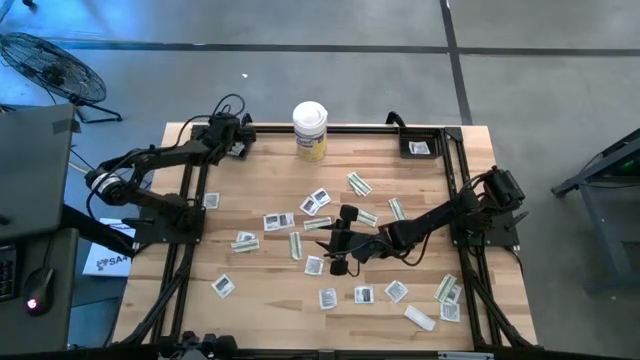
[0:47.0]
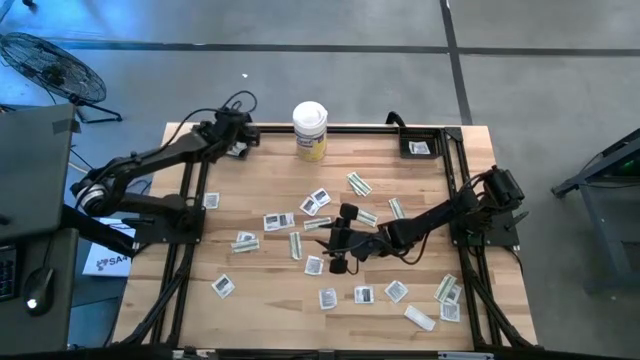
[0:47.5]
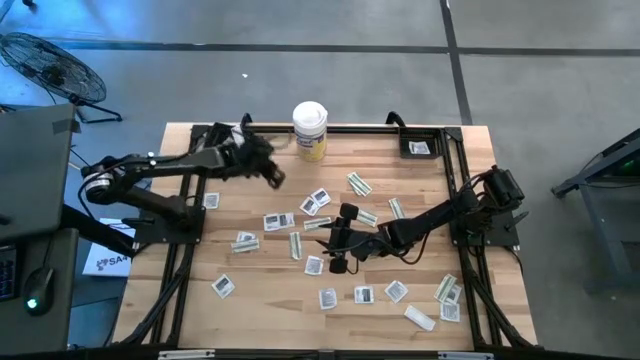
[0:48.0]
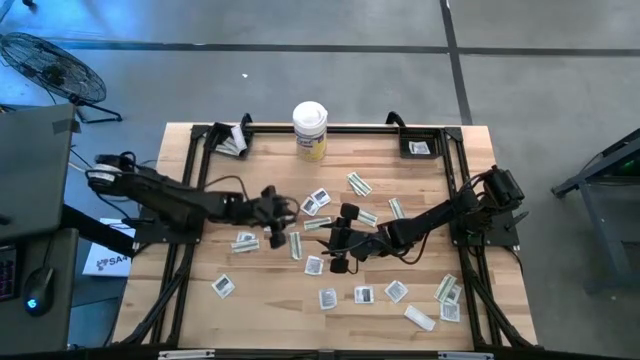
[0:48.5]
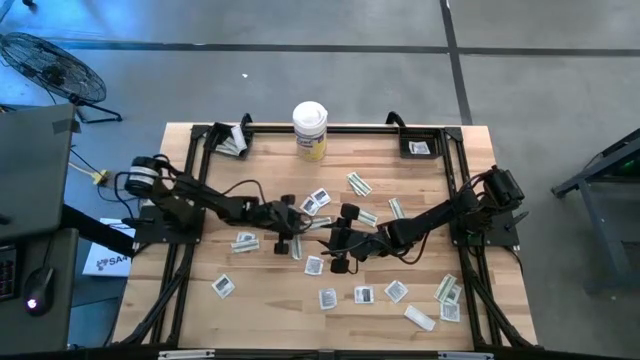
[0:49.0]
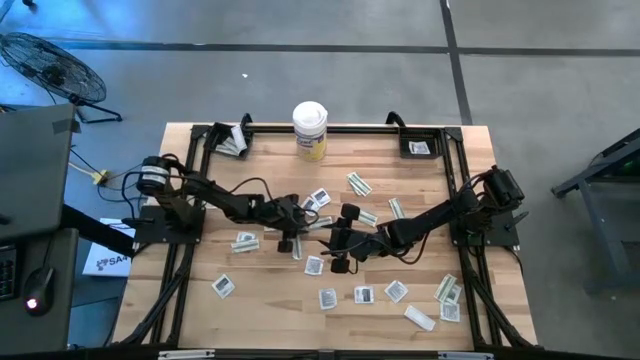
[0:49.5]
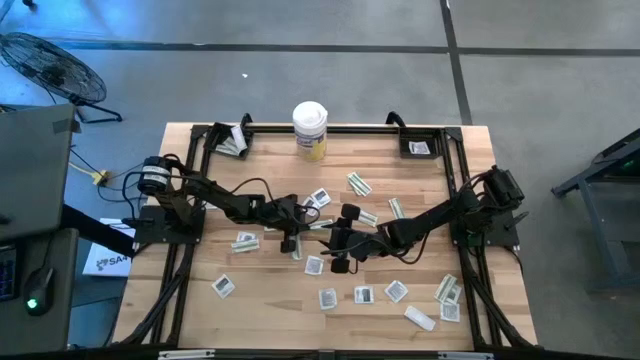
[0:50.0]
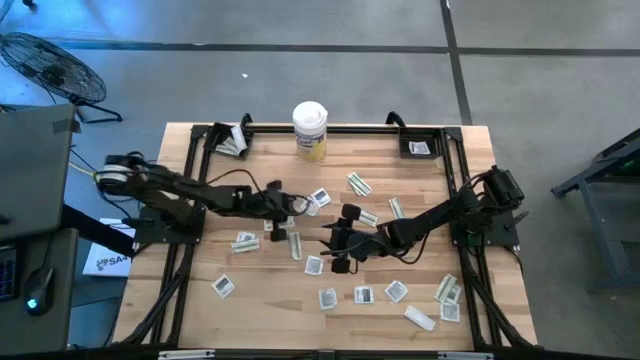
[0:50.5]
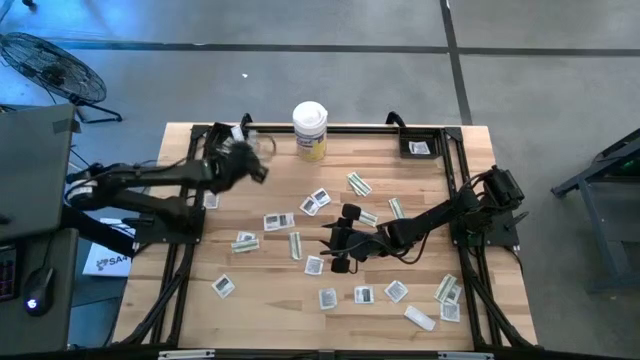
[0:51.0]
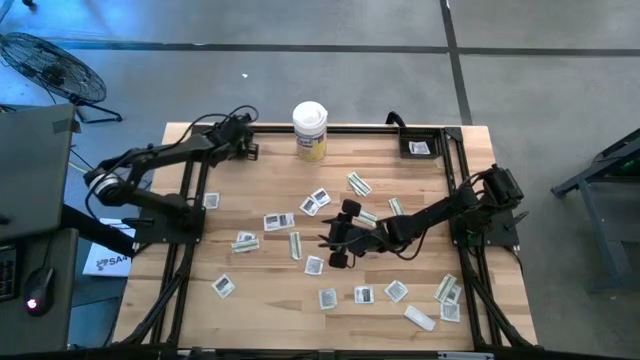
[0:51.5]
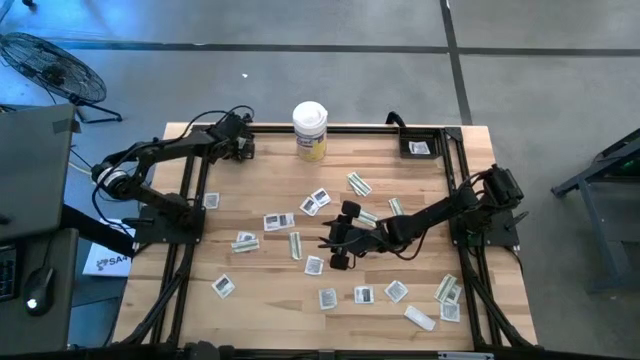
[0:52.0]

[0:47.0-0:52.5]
Task: Pick & Place First Aid Supplies
Put the green bandage pack into the left black basket

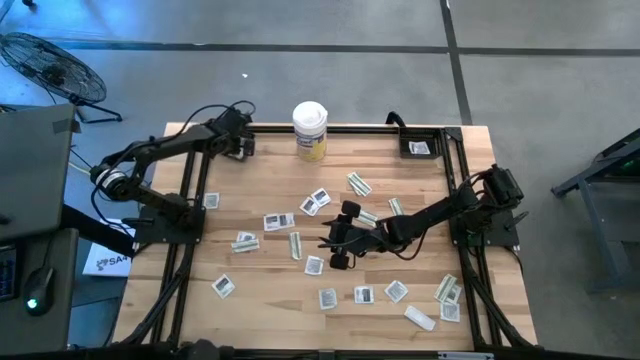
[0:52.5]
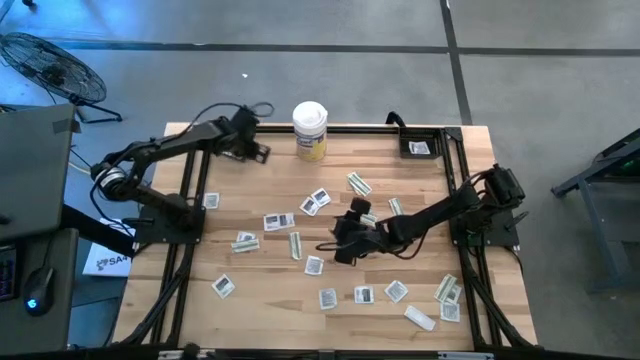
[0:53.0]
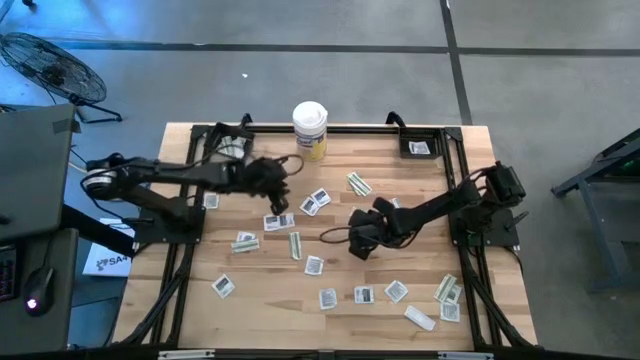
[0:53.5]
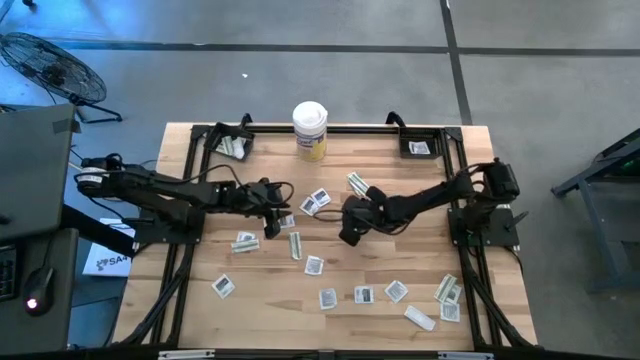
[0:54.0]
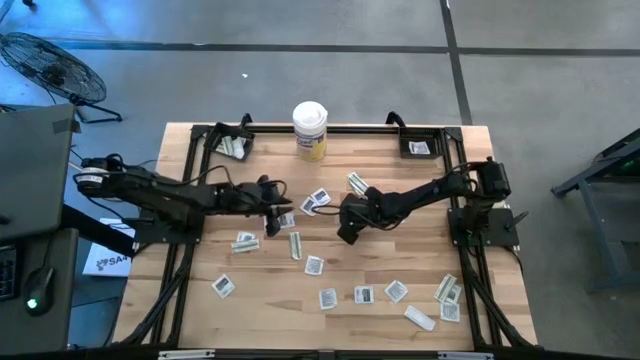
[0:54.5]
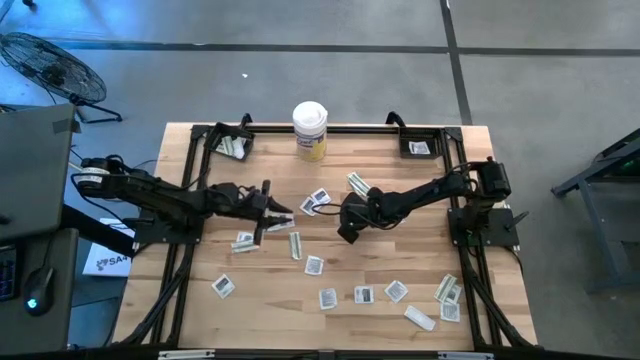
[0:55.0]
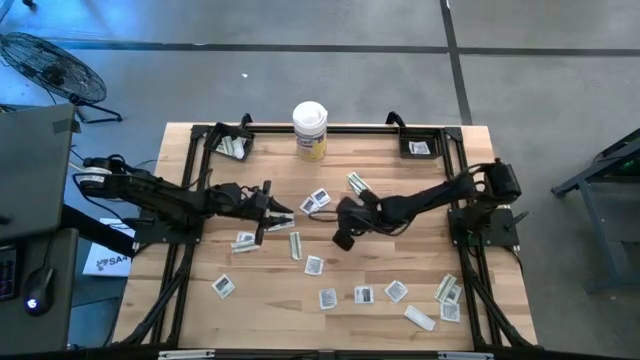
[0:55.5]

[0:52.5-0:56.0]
Put the green bandage pack into the left black basket

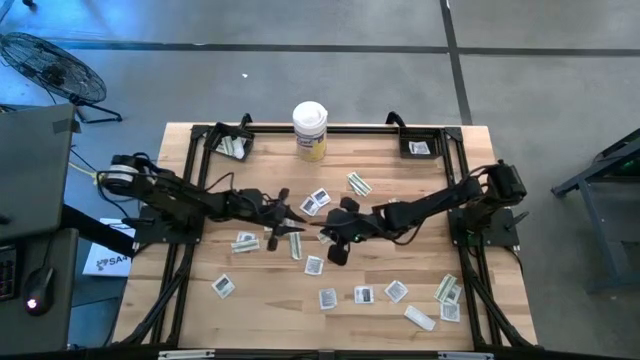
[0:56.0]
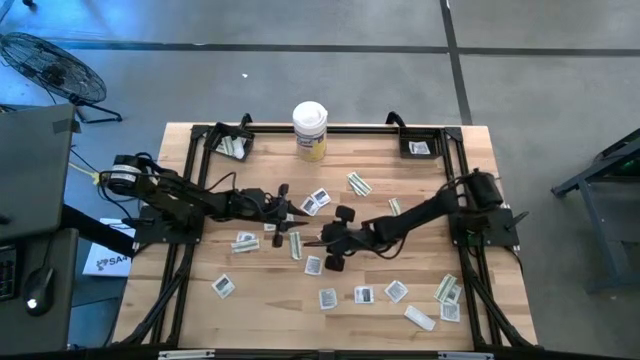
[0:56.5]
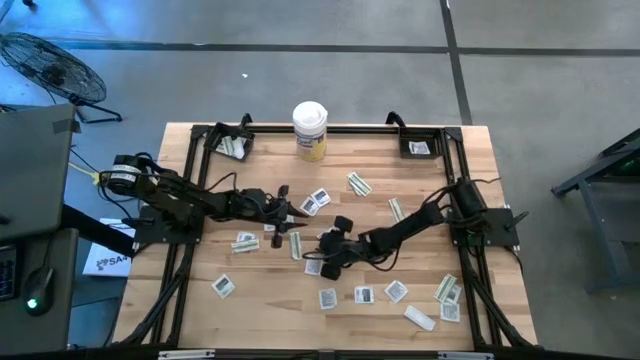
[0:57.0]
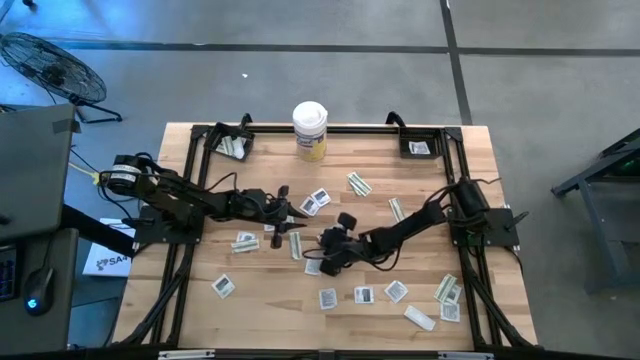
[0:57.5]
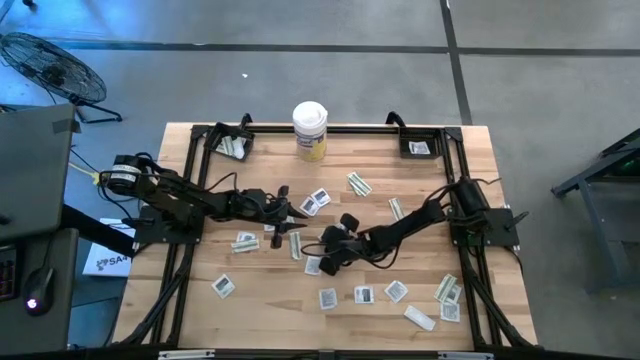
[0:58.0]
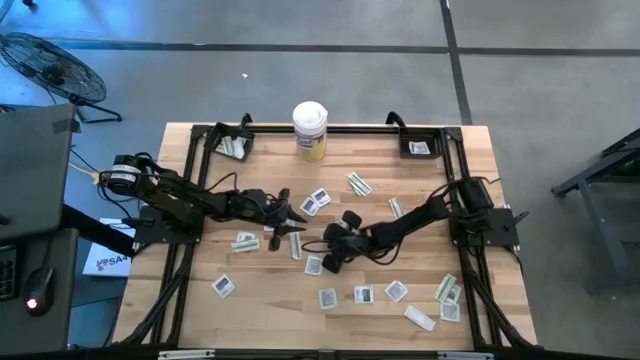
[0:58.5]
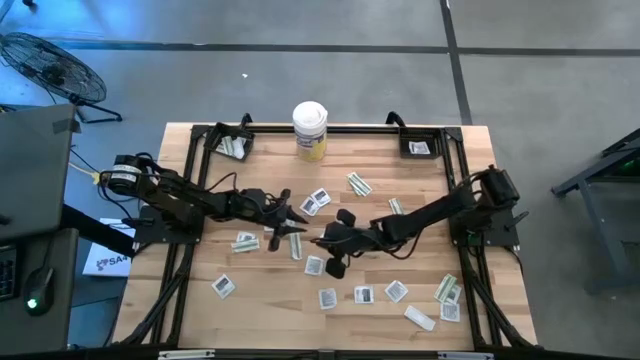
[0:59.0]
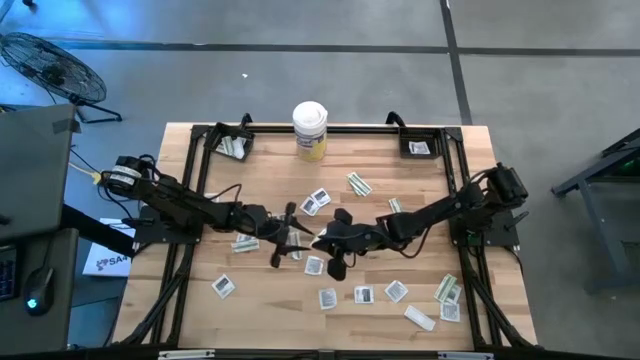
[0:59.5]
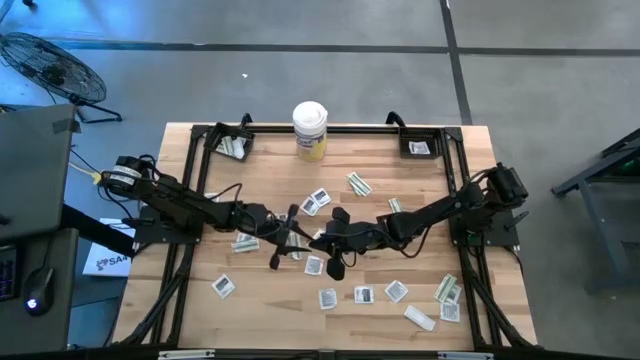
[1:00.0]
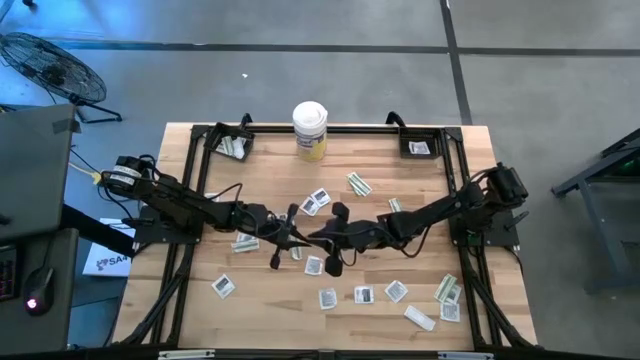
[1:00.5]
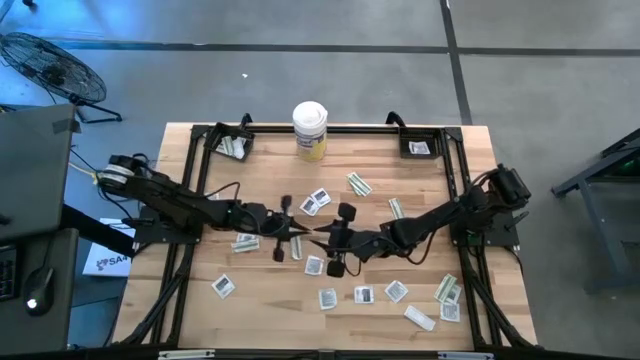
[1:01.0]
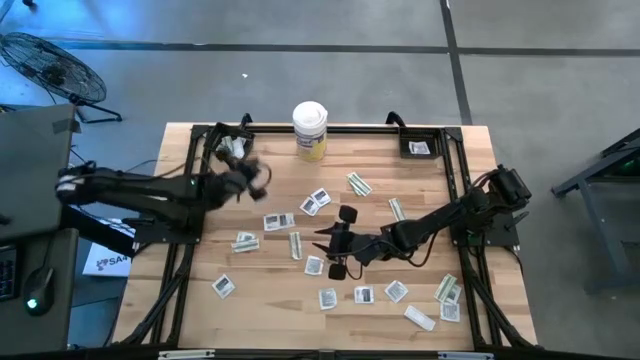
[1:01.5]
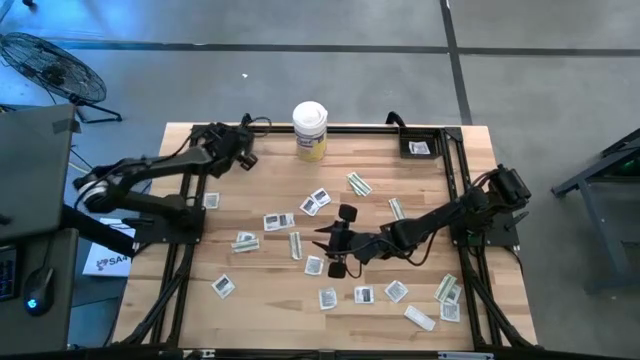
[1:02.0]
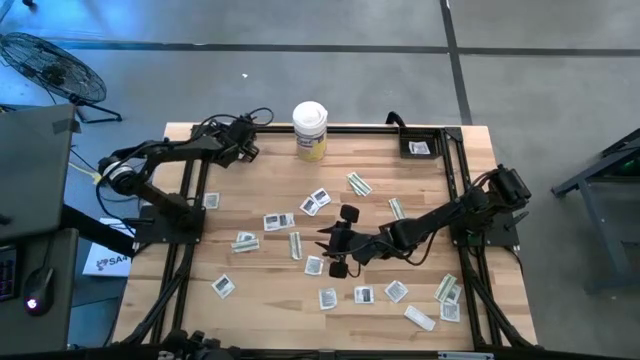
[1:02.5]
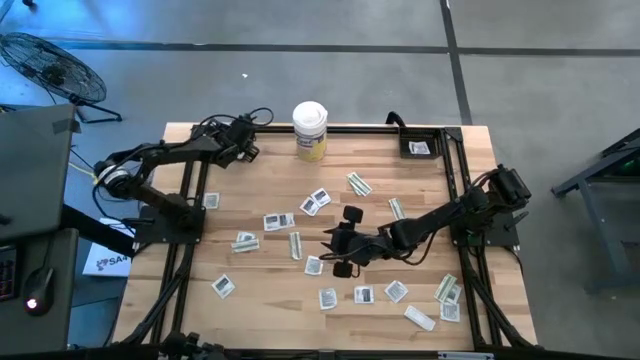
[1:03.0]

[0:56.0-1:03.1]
Put the green bandage pack into the left black basket

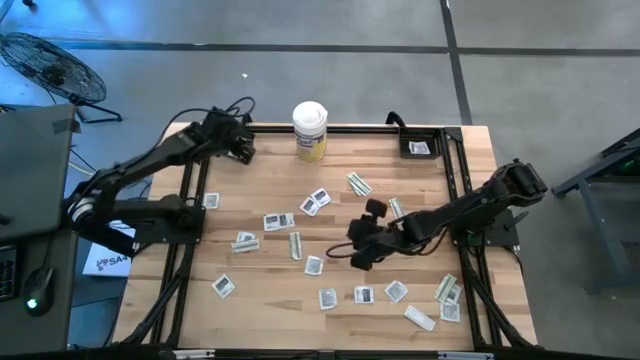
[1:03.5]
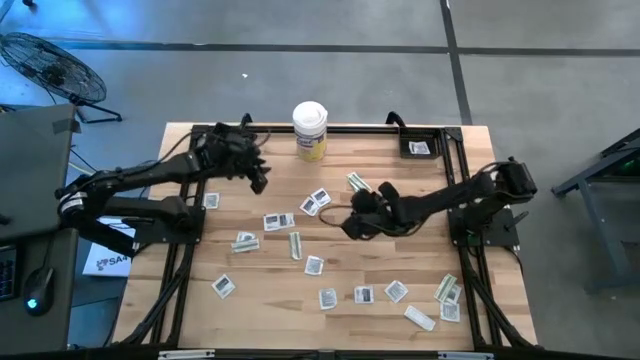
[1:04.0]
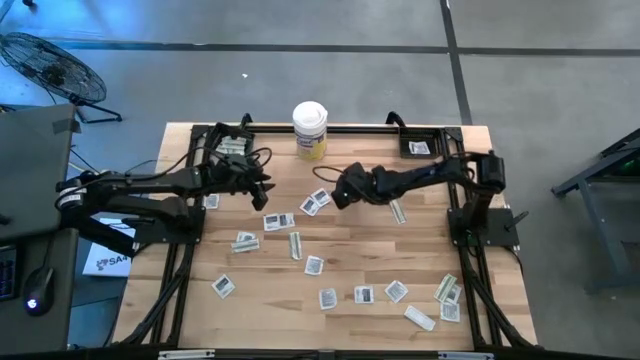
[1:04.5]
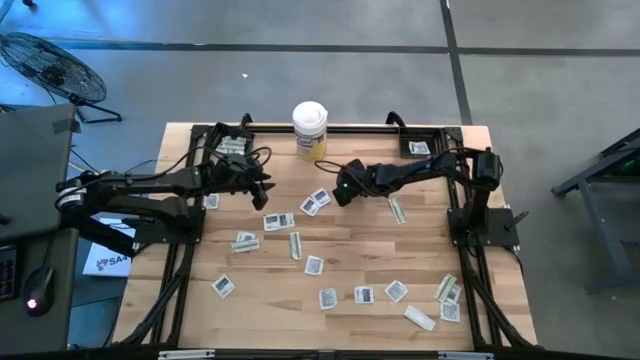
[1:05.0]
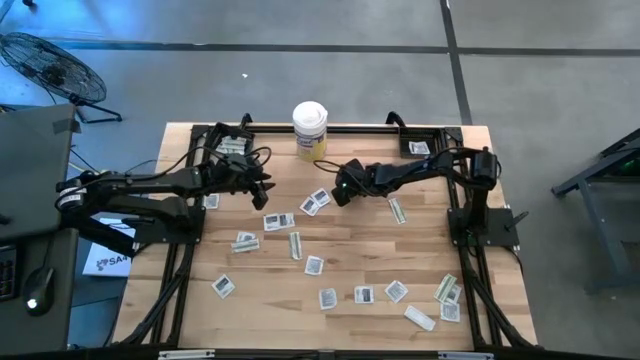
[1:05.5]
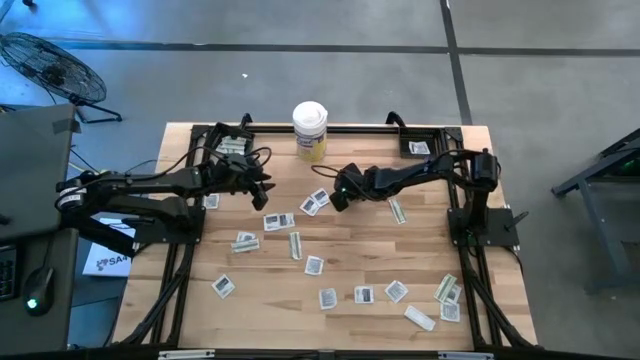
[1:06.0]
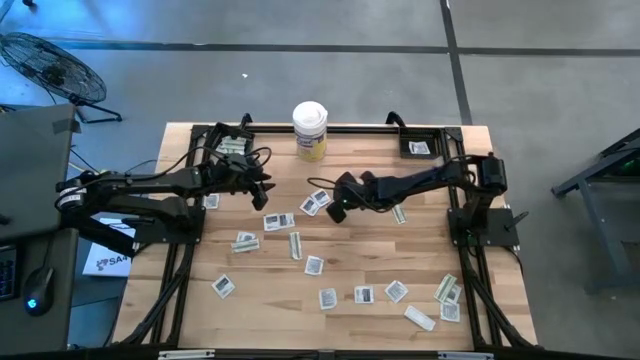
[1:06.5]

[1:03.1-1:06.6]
Put the green bandage pack into the left black basket

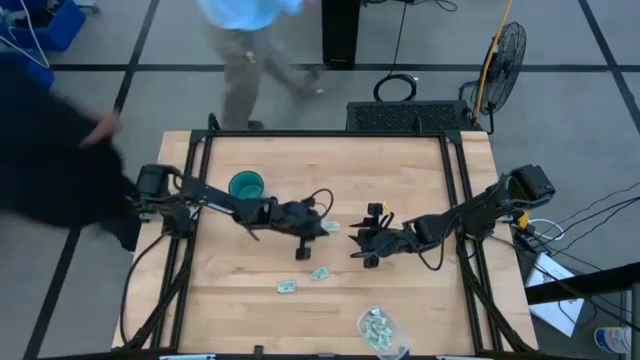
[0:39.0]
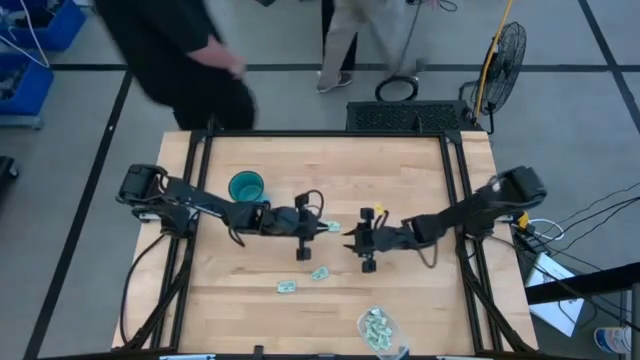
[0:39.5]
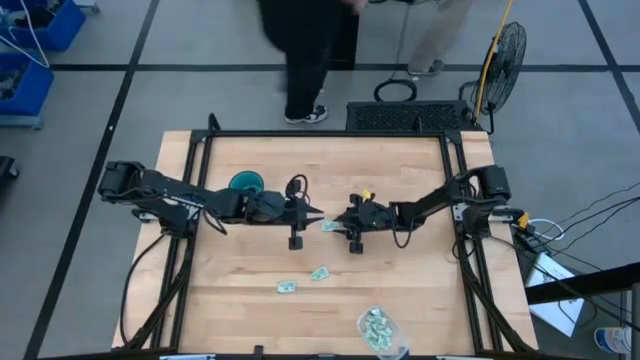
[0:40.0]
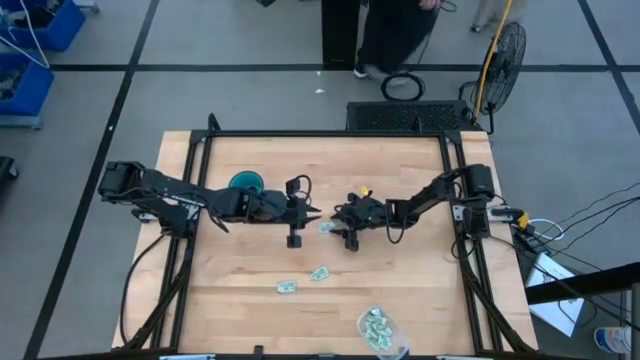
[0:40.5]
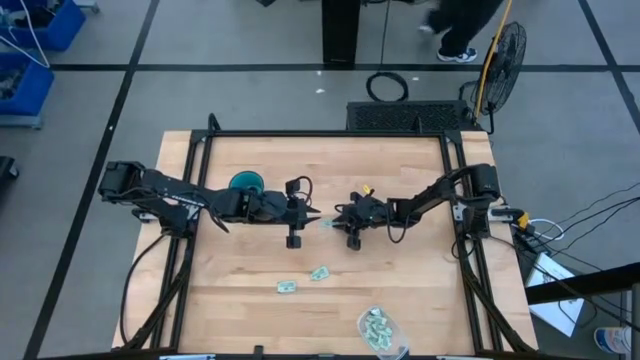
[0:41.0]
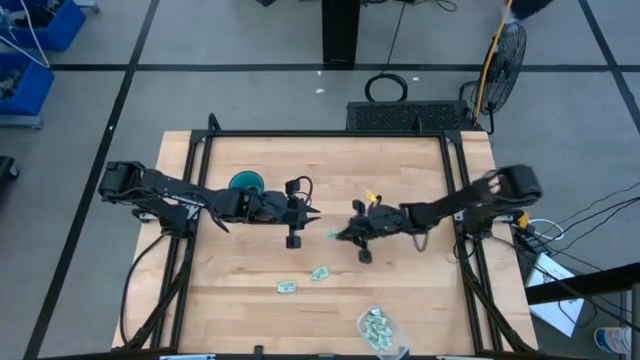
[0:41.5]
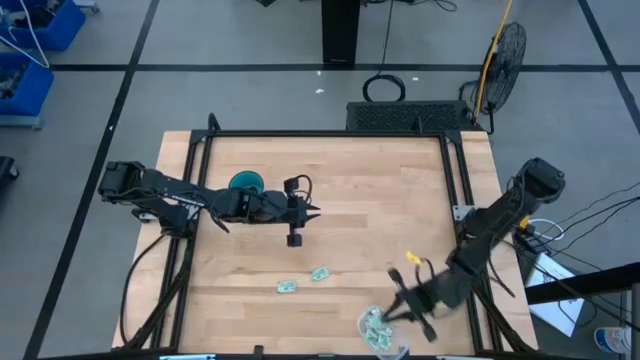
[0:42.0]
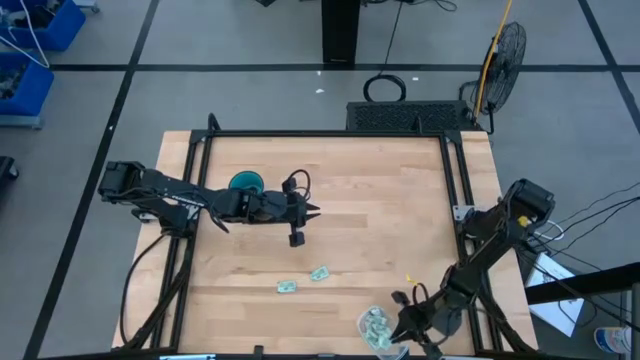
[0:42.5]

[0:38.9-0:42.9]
Task: Pick and place Stevia / Truvia into bins
Put the green stevia packet into the transparent container
